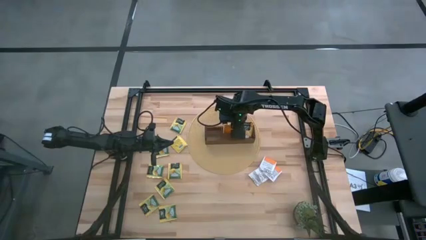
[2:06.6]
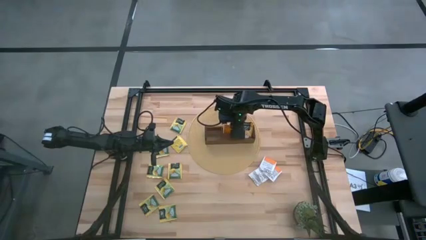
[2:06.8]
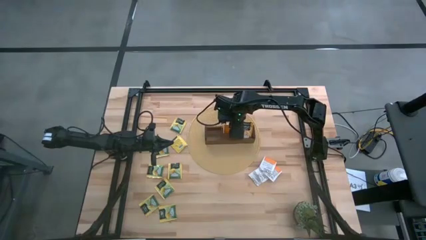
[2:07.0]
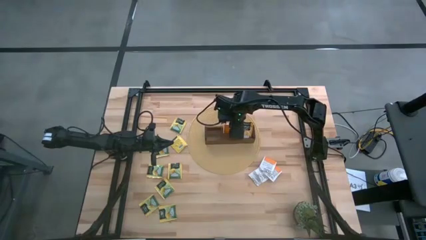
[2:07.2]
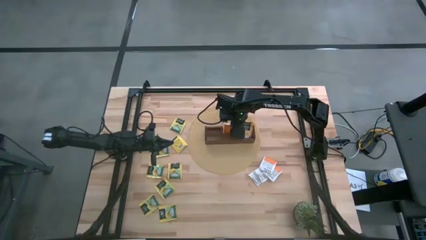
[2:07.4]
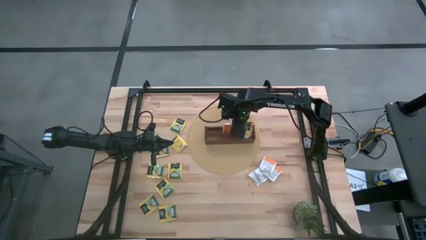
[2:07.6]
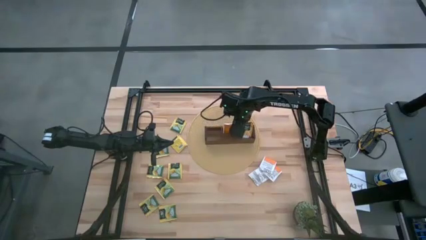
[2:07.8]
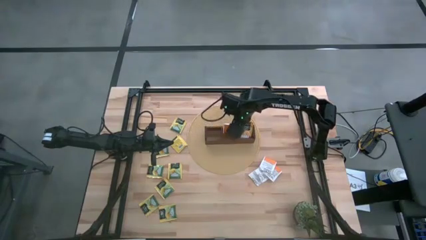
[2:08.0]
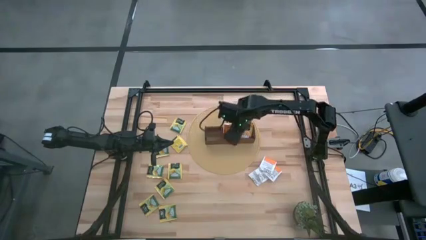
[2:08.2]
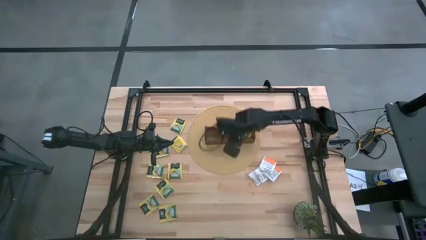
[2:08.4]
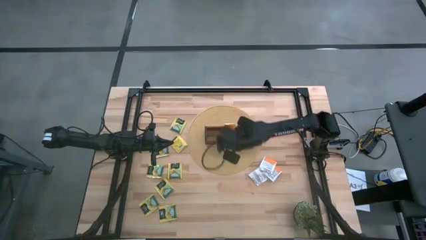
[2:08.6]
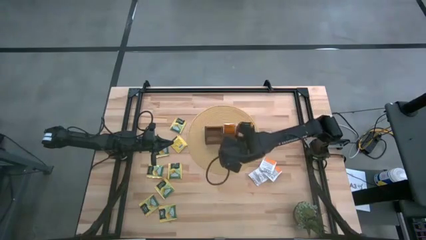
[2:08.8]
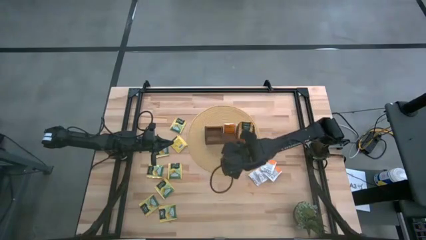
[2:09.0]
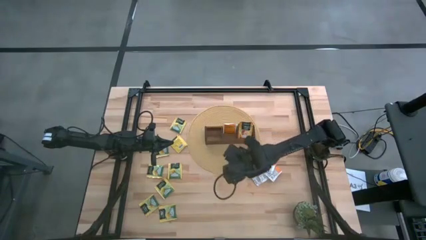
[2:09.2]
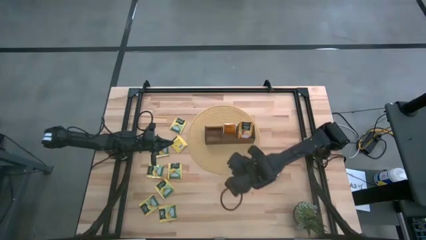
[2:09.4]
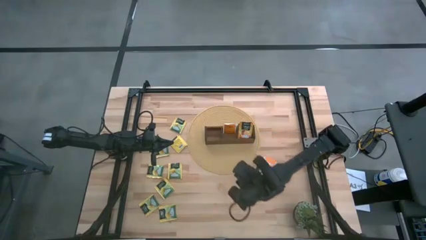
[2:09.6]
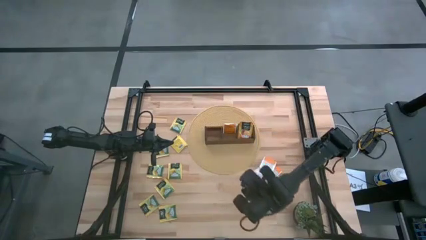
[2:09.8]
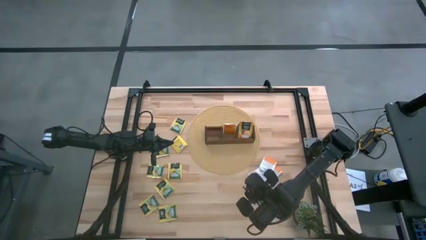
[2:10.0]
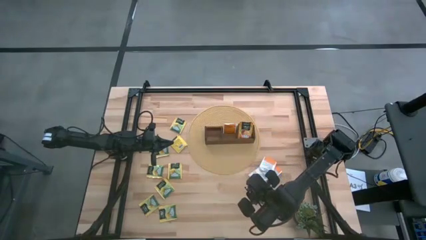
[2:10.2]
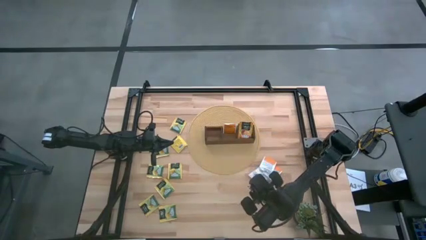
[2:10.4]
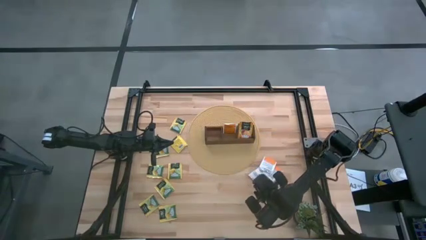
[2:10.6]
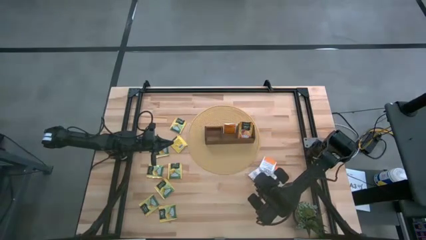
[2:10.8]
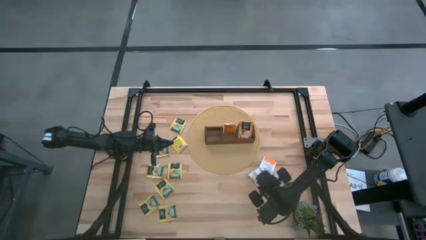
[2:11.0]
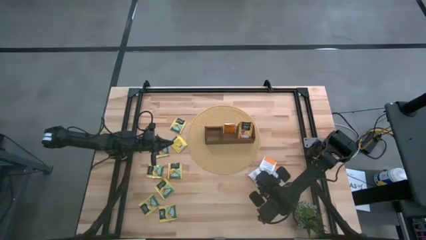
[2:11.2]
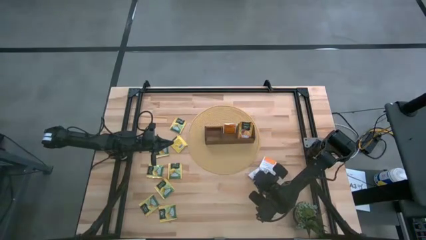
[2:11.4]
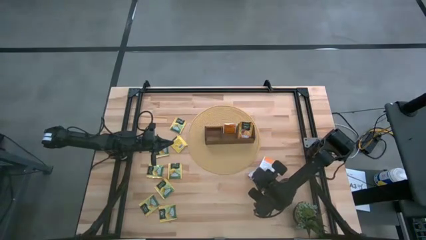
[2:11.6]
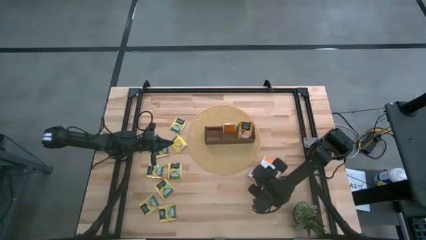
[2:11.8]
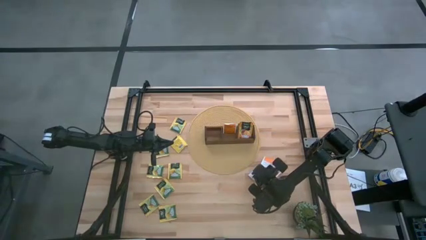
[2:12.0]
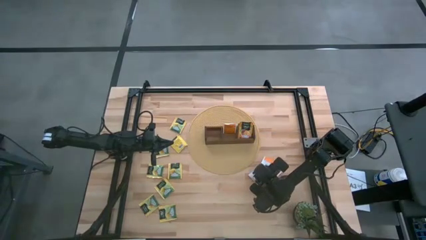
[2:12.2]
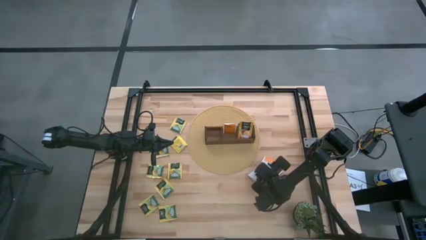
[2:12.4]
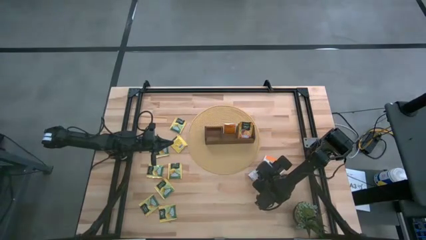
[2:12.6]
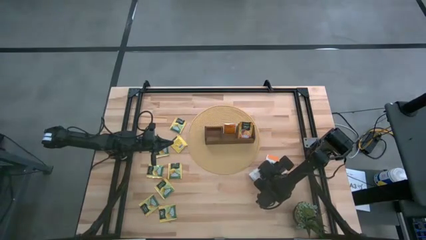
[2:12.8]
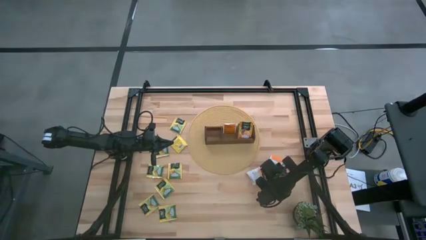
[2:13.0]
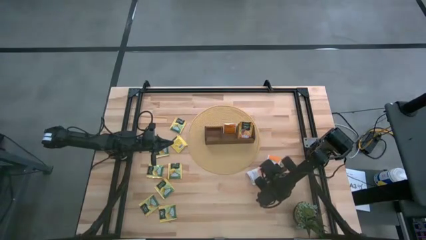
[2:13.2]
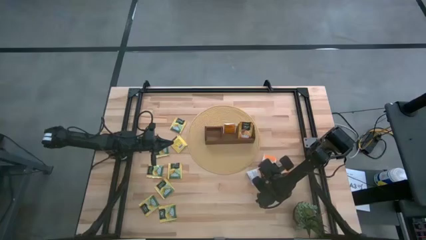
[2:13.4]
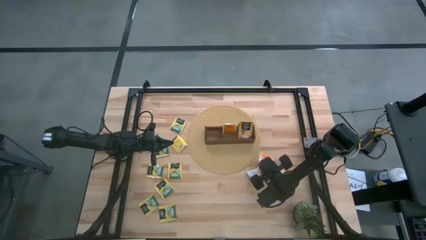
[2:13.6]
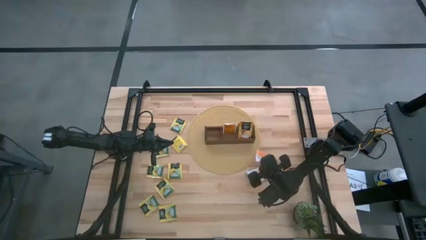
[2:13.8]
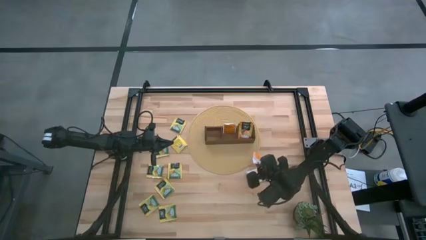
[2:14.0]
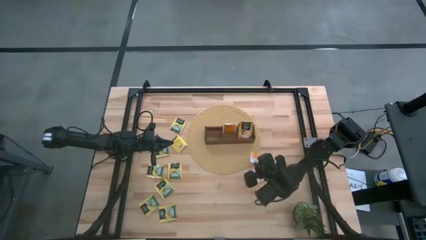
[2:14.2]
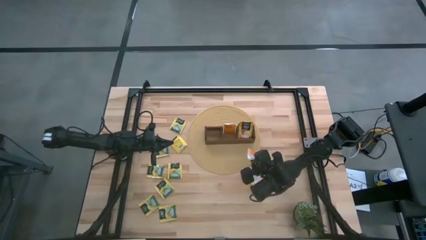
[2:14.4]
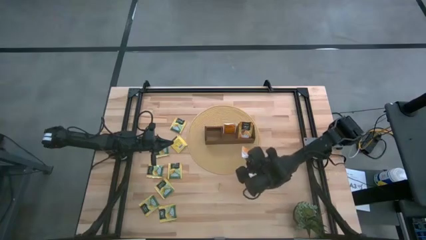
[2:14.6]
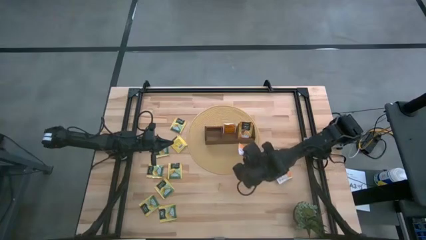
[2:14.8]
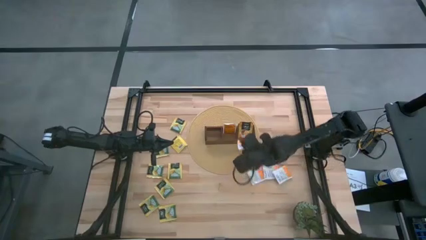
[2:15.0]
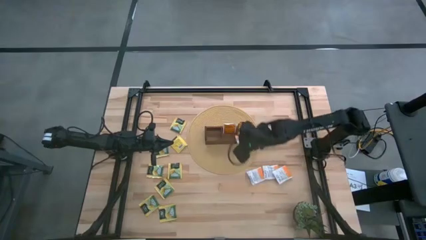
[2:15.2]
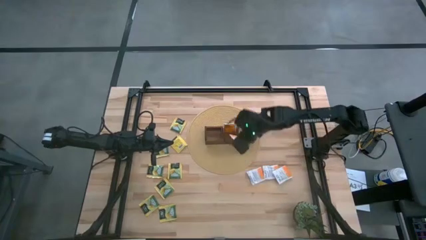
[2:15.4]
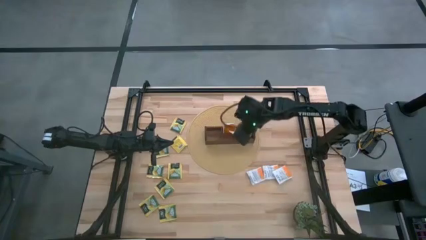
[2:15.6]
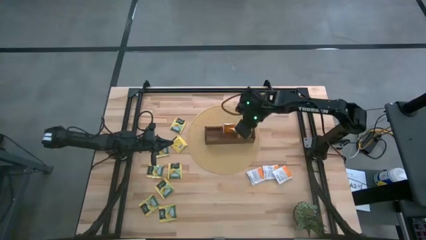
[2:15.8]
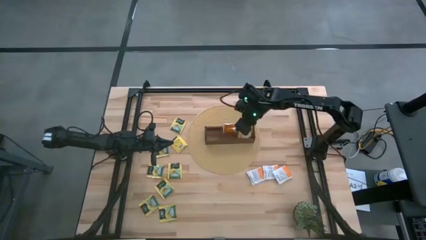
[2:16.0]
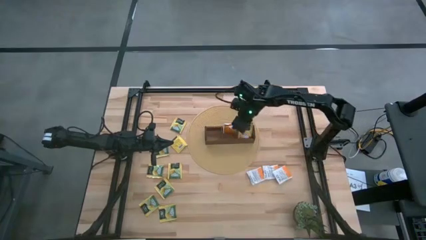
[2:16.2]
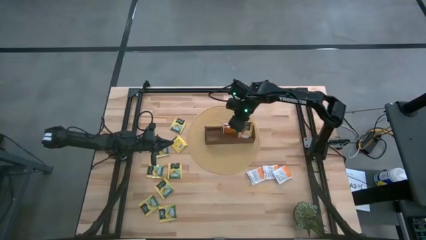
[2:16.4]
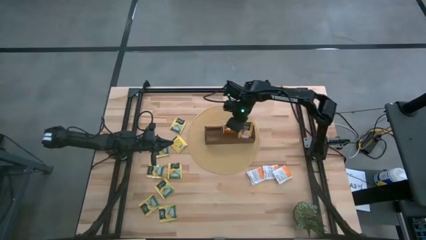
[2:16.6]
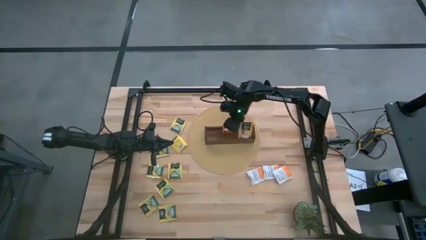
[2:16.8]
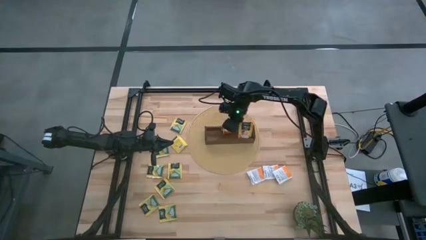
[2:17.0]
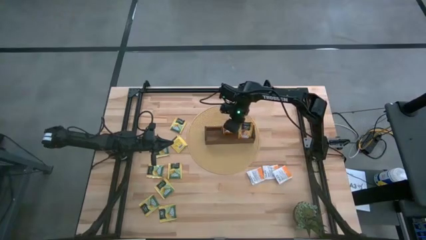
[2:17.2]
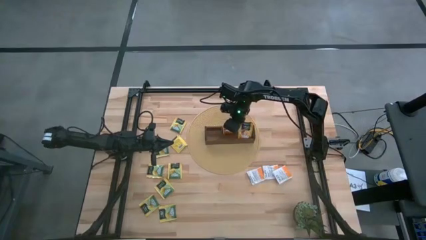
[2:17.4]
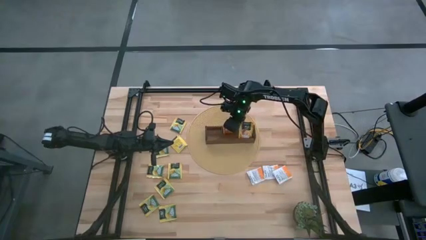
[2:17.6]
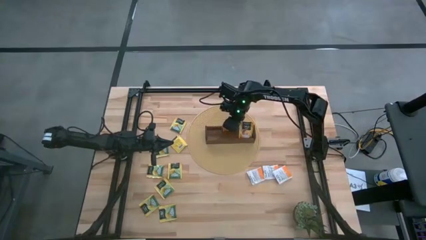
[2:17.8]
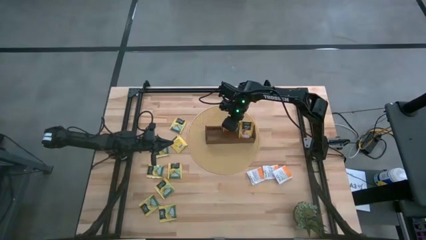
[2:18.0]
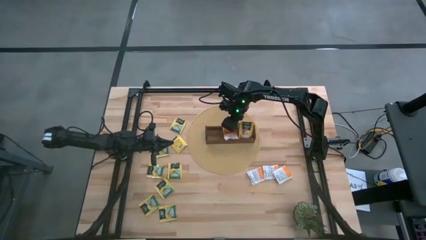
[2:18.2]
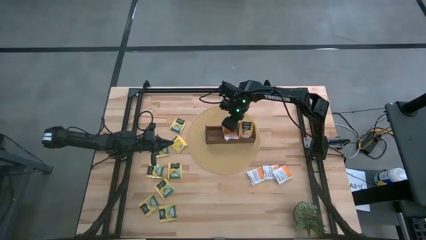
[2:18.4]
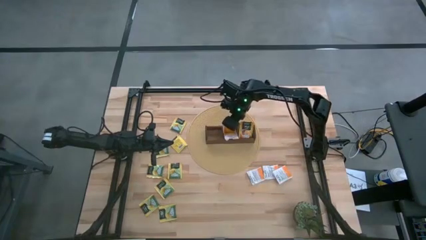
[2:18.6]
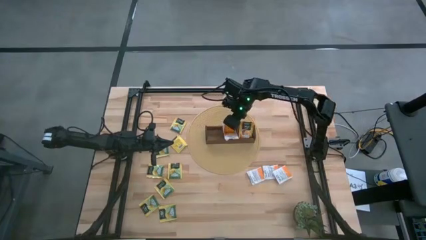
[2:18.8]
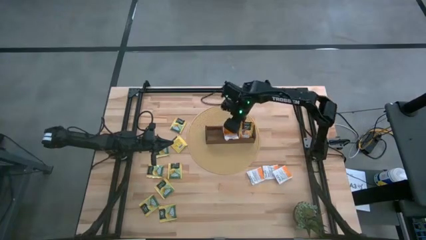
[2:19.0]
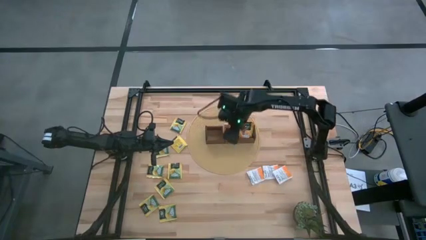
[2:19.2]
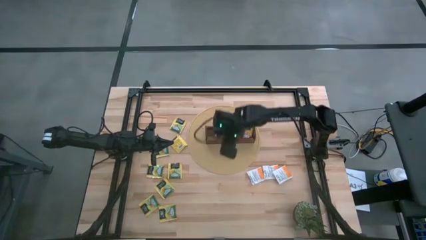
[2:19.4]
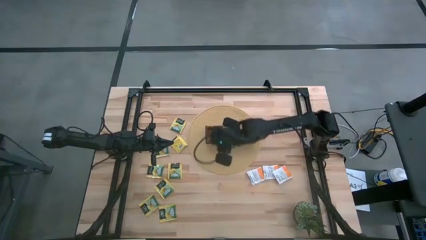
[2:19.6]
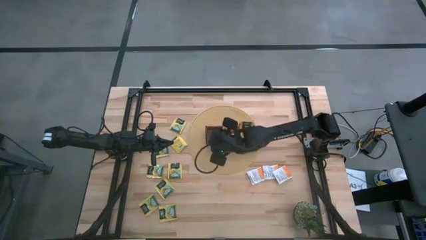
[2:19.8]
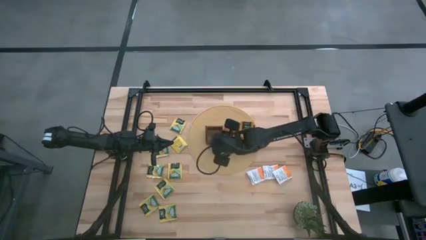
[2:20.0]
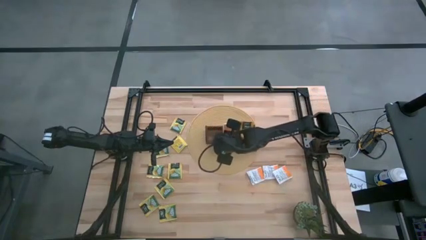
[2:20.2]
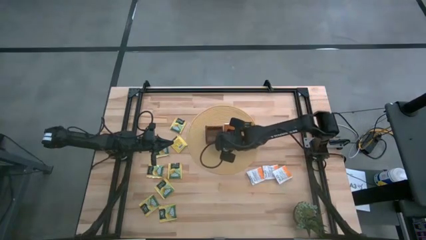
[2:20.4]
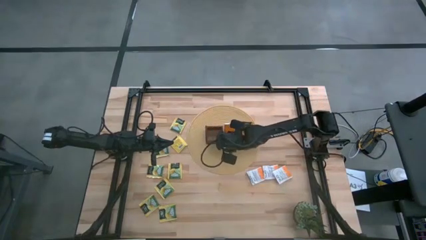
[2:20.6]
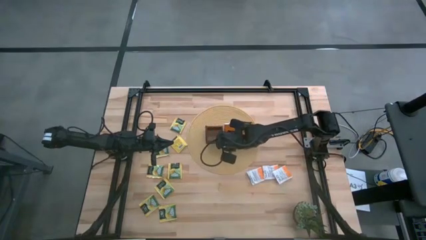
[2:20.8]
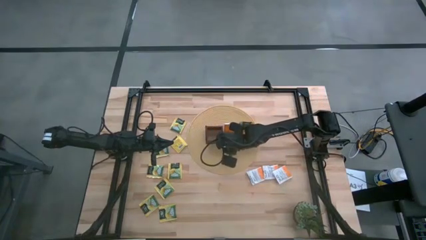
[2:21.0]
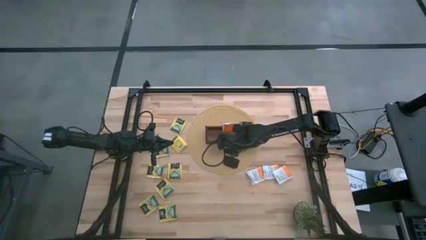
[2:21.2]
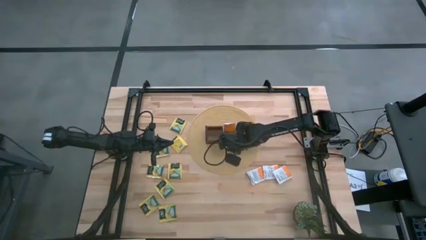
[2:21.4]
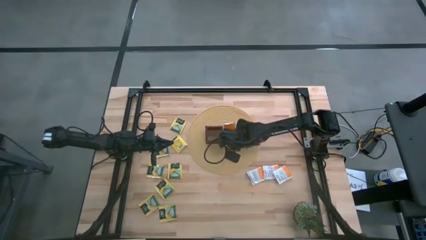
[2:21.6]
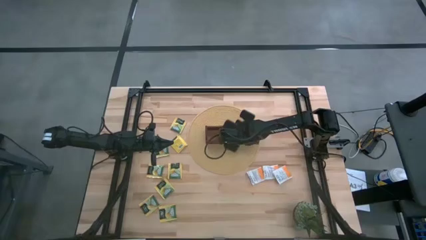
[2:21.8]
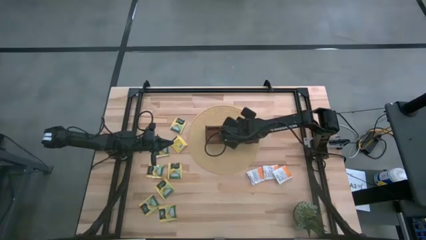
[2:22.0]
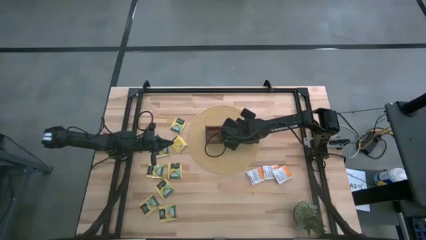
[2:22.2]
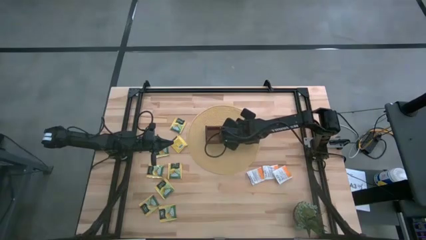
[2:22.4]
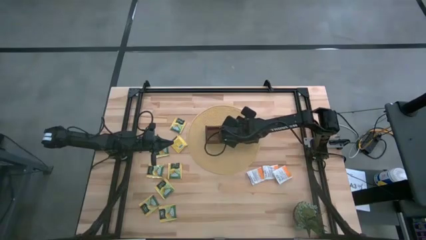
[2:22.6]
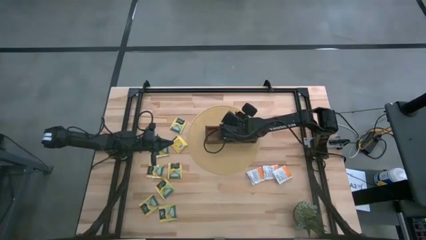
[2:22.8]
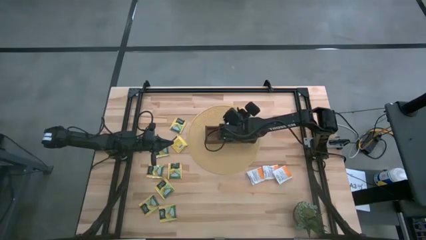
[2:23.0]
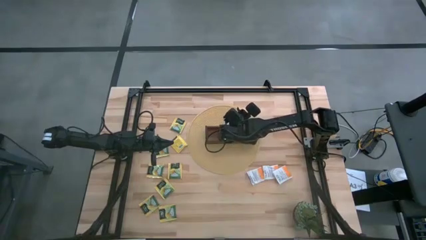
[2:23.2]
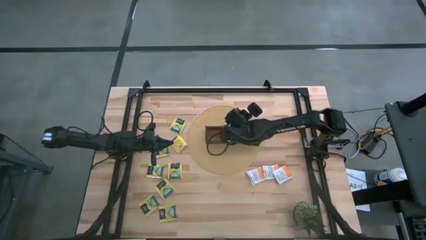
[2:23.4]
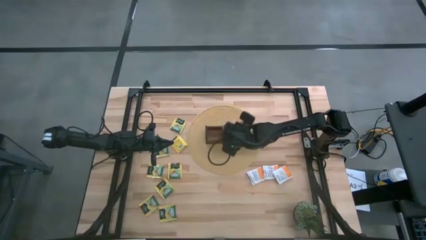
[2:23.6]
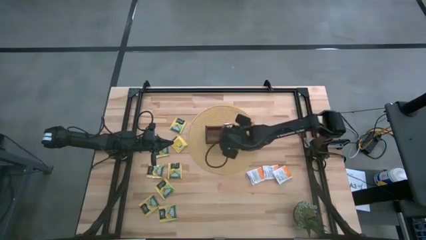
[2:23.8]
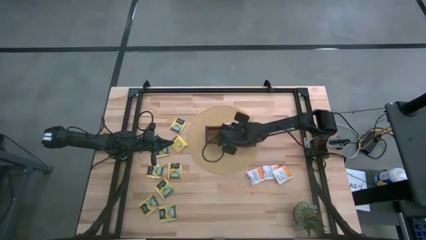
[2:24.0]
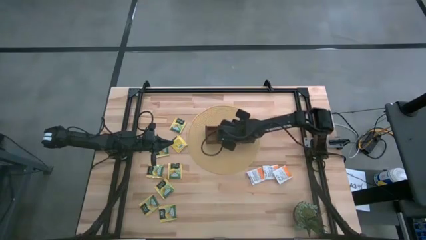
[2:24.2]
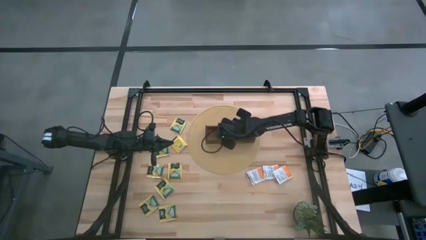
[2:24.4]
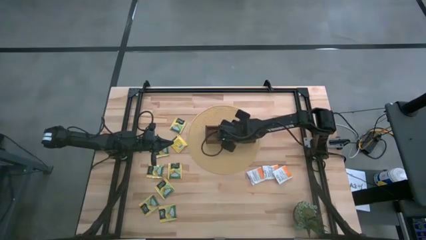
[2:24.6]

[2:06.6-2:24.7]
Task: Pick & Place Tea
Put the white tea bag into the middle section of the wooden organizer
